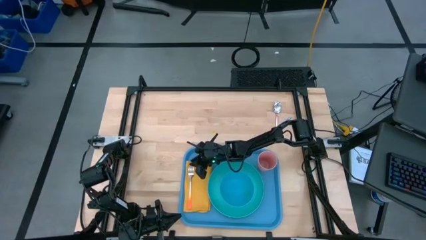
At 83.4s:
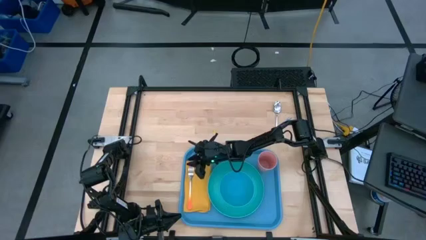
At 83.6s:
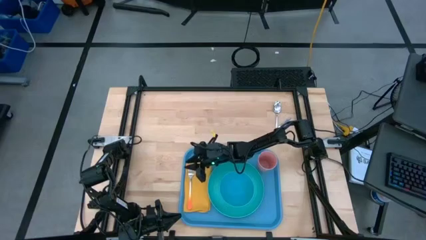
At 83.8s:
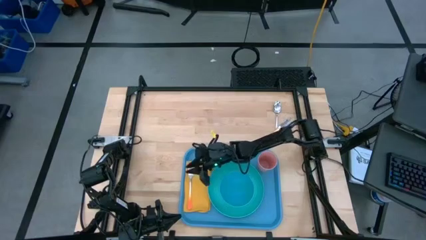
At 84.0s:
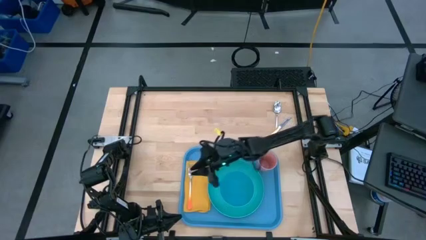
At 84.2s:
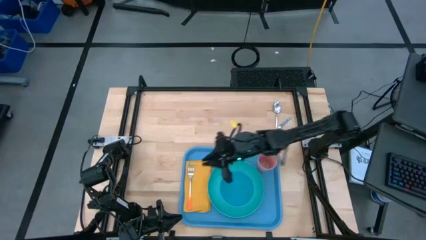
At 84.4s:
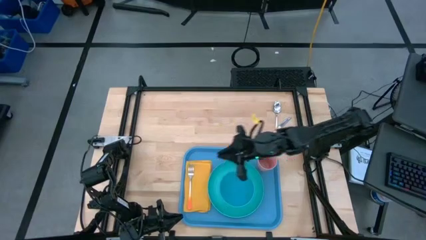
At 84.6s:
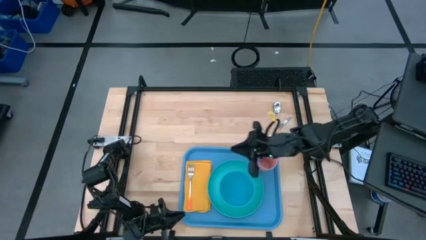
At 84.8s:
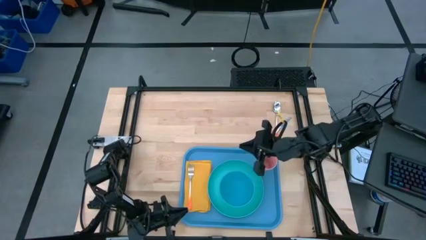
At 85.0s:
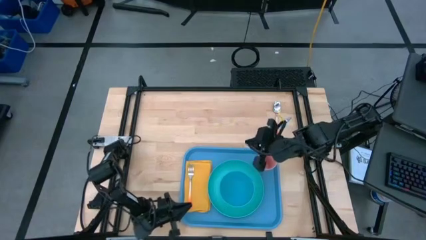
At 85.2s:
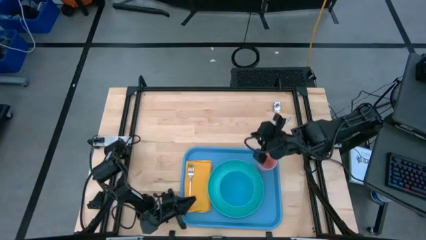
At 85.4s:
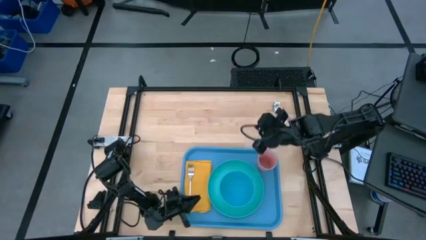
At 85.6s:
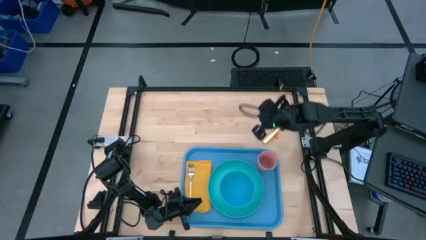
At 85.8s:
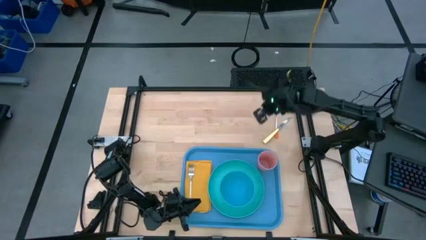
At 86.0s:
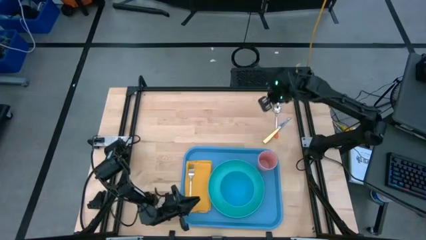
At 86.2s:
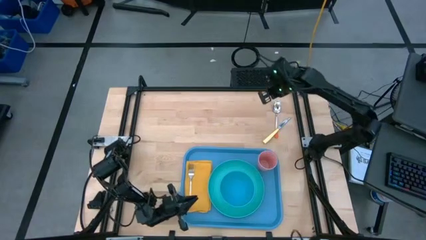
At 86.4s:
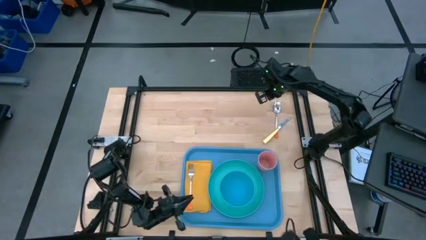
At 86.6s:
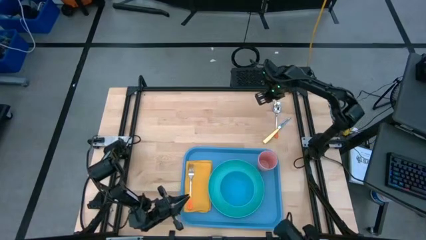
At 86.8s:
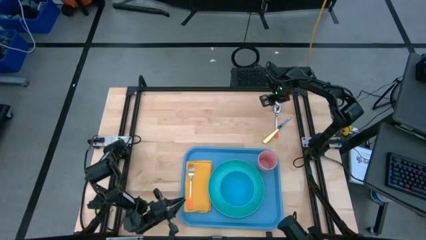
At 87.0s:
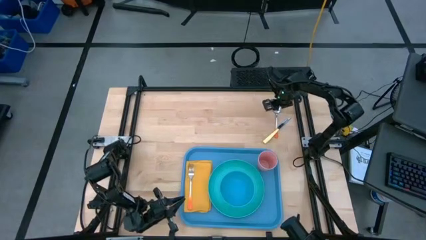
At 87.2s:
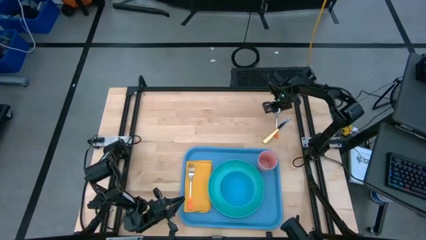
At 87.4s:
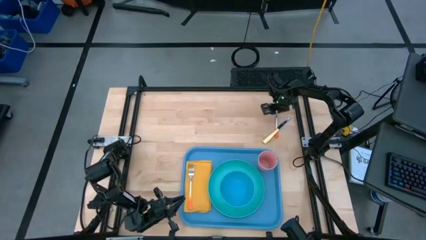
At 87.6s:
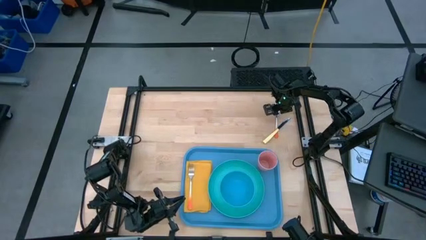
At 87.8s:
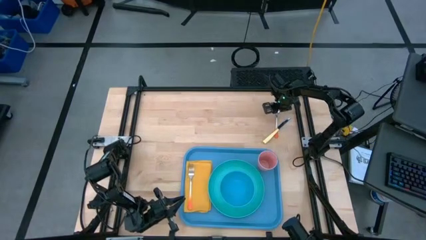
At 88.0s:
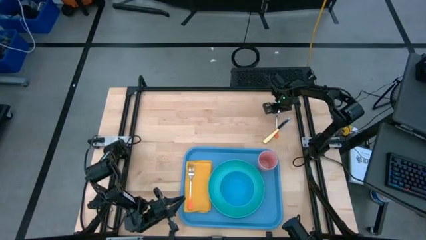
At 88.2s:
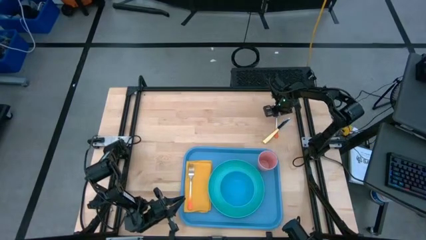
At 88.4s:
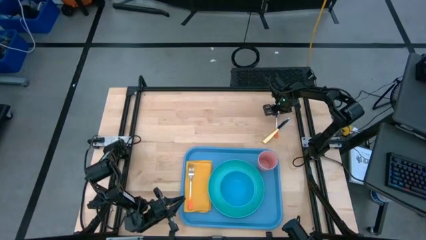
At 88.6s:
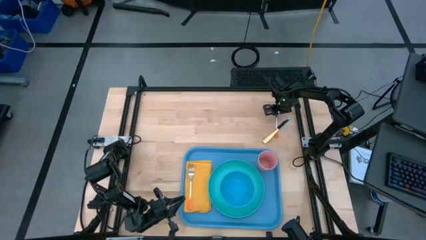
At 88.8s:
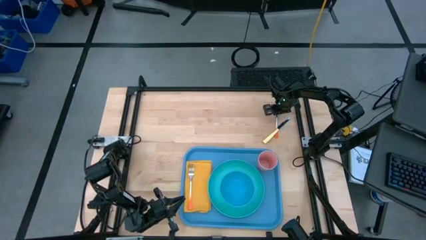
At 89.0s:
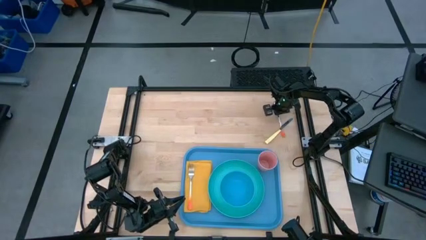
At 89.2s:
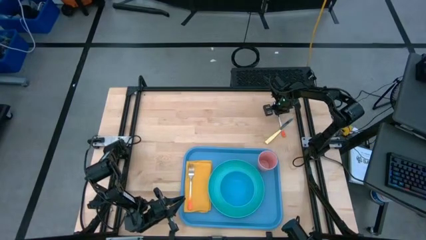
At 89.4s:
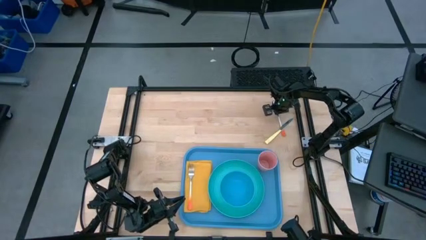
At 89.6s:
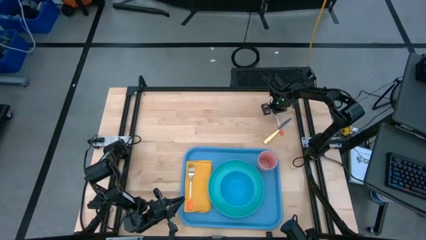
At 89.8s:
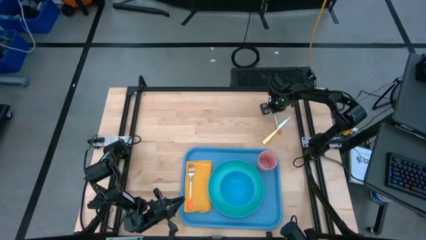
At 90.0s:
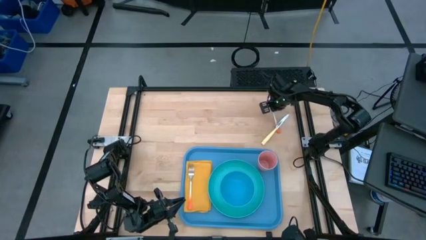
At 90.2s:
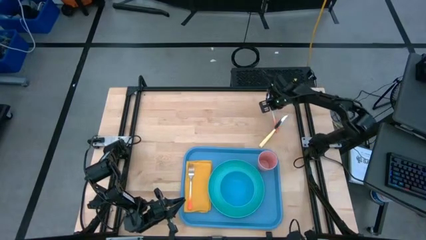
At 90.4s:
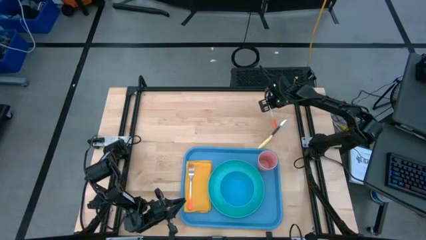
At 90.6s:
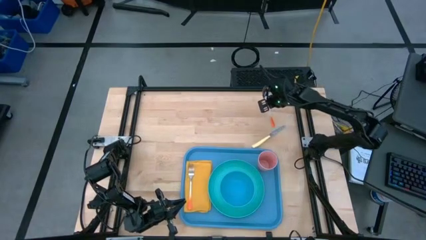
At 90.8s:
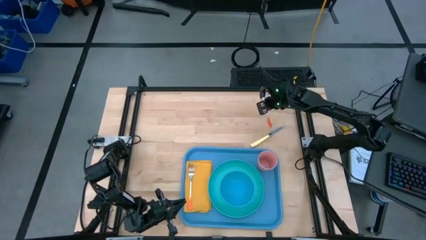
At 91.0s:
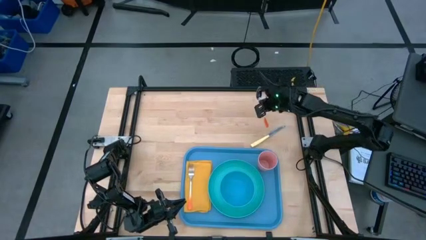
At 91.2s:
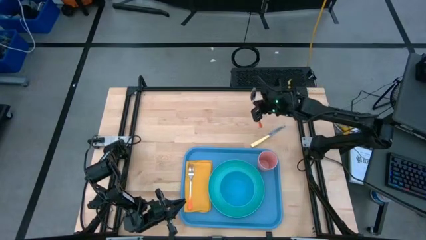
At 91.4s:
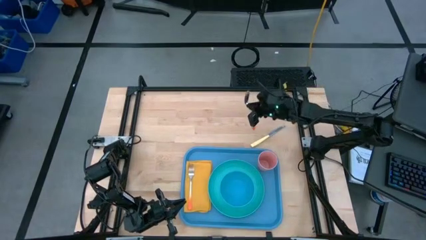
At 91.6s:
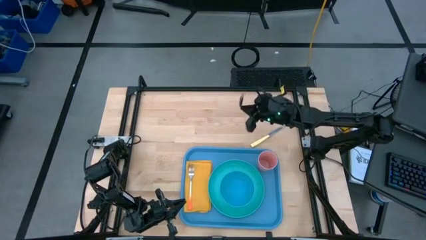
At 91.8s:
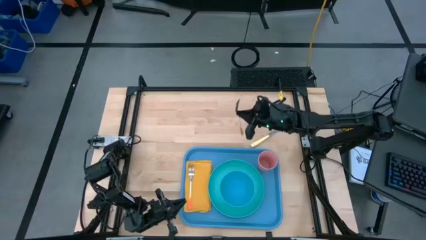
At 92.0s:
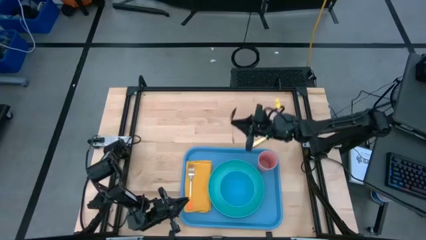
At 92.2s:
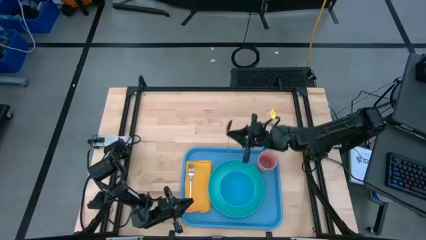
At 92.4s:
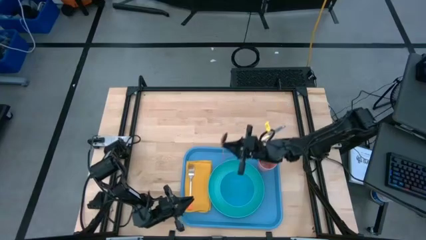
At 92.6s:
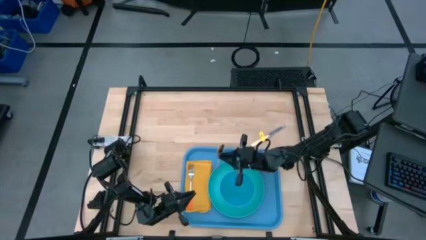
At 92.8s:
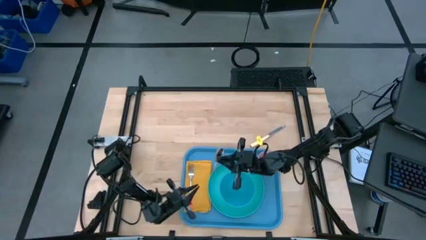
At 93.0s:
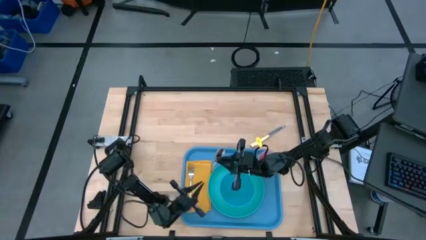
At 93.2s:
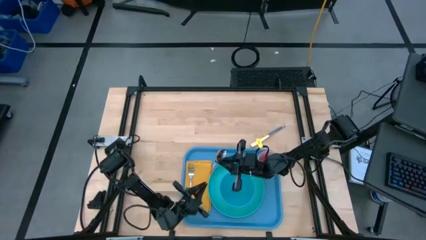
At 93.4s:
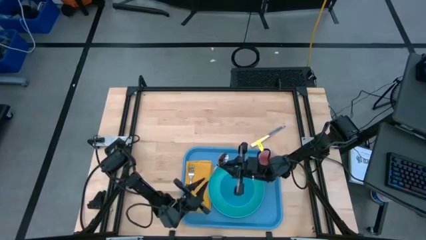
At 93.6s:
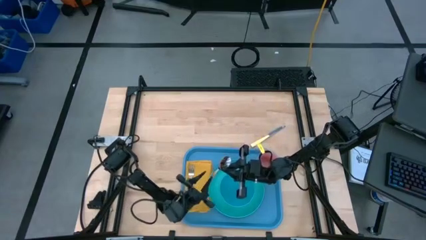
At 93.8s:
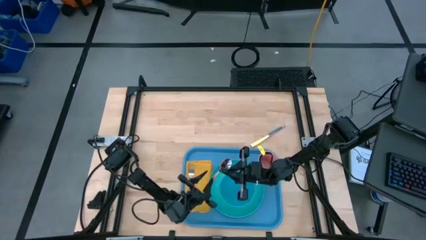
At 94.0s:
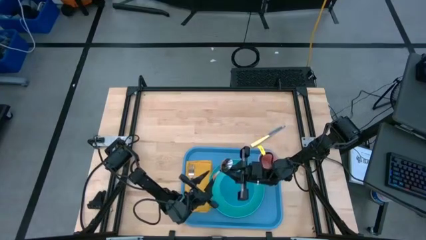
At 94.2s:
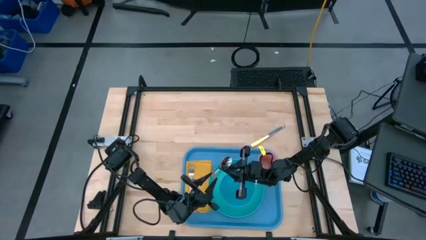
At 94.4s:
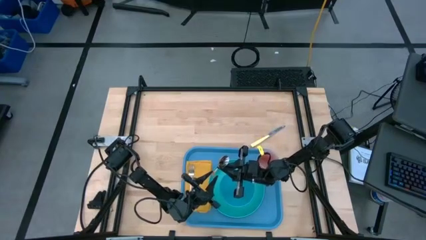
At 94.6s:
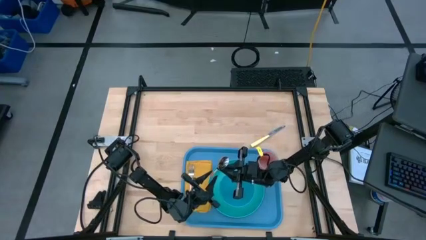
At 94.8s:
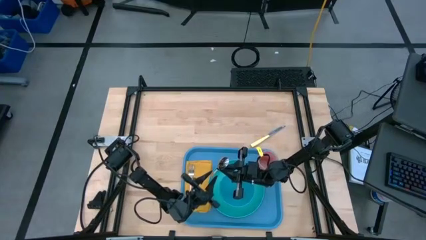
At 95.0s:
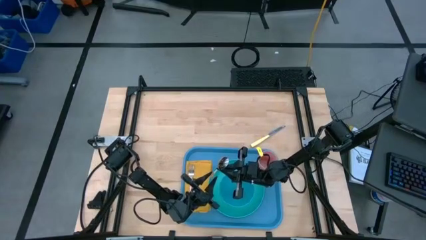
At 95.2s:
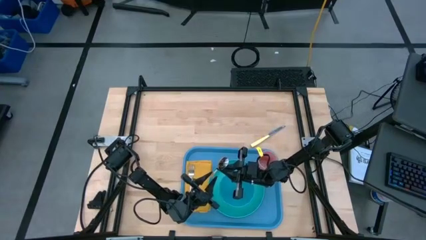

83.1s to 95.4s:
Task: Set up tray
Put the spoon beside the fork on top of the napkin

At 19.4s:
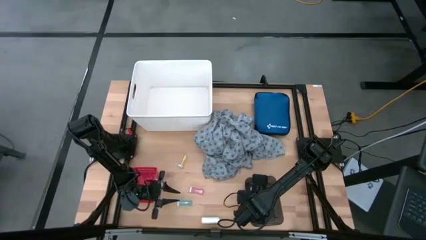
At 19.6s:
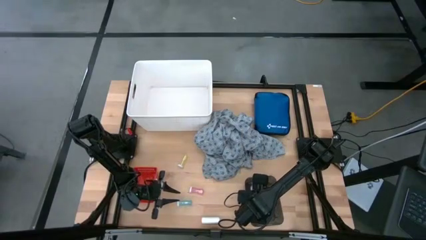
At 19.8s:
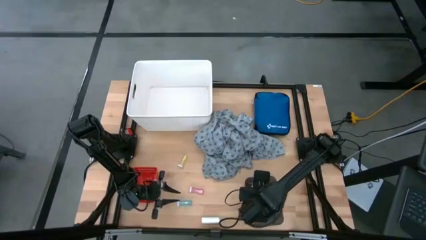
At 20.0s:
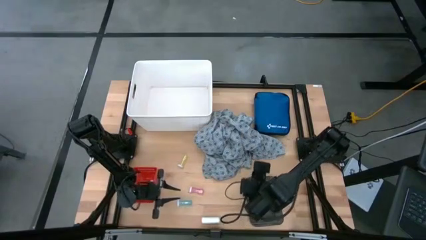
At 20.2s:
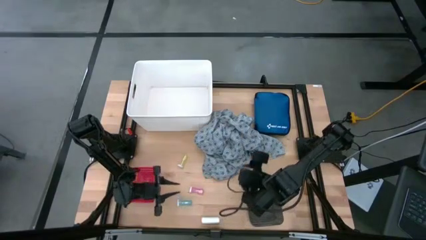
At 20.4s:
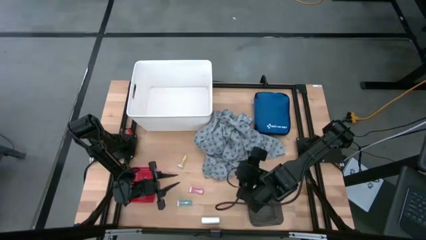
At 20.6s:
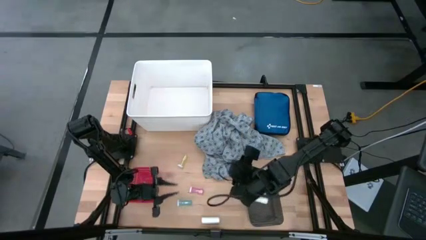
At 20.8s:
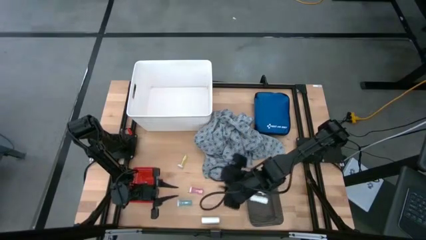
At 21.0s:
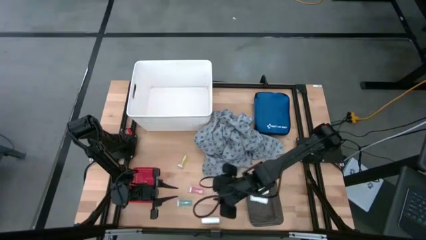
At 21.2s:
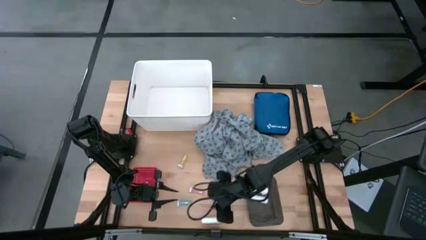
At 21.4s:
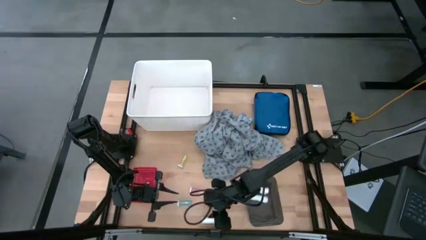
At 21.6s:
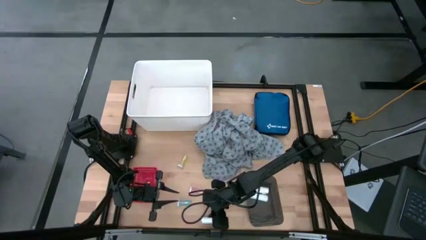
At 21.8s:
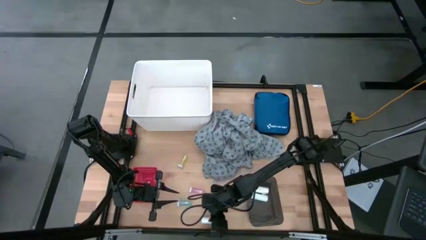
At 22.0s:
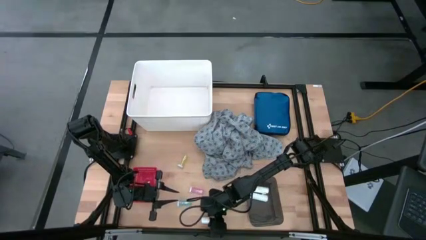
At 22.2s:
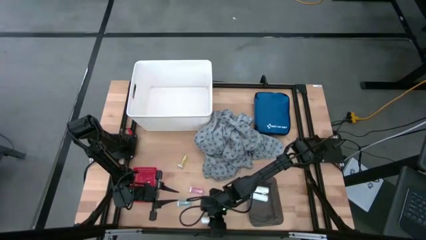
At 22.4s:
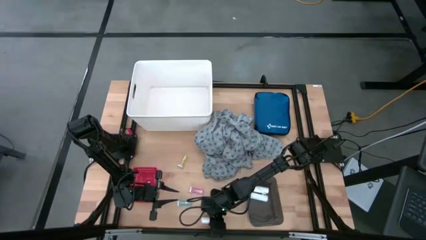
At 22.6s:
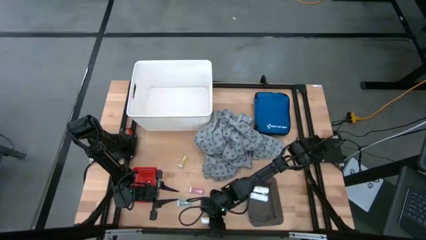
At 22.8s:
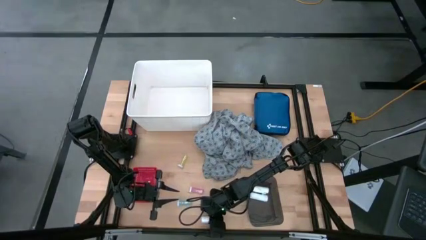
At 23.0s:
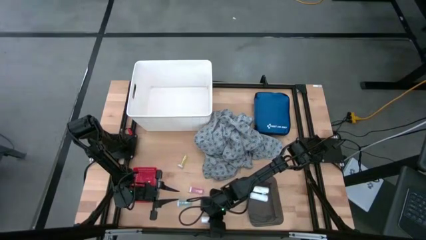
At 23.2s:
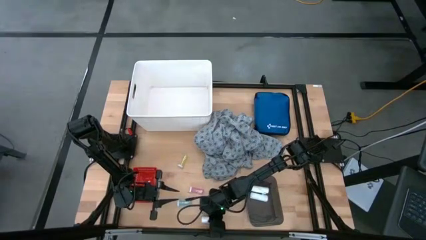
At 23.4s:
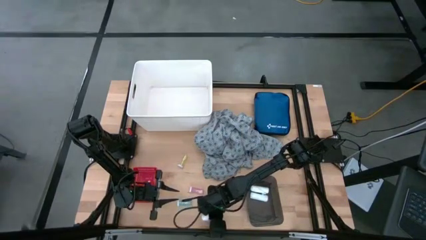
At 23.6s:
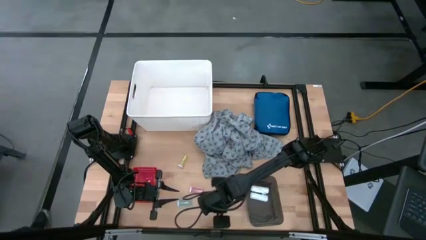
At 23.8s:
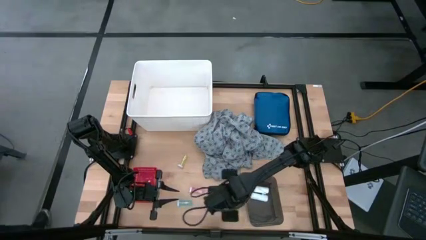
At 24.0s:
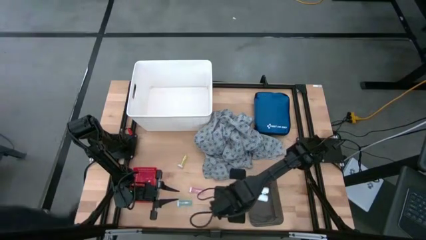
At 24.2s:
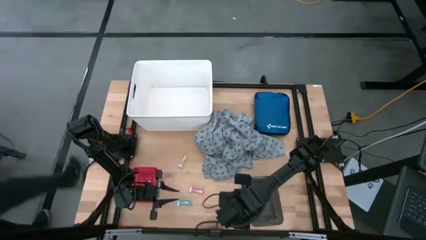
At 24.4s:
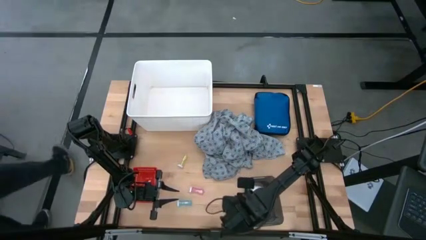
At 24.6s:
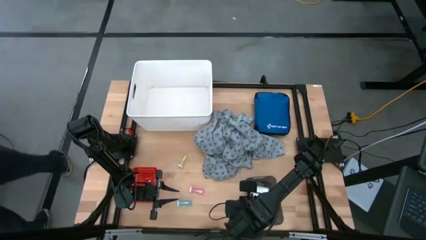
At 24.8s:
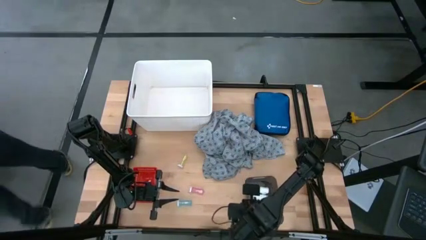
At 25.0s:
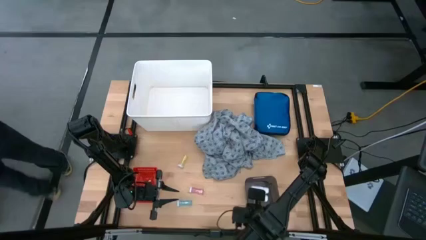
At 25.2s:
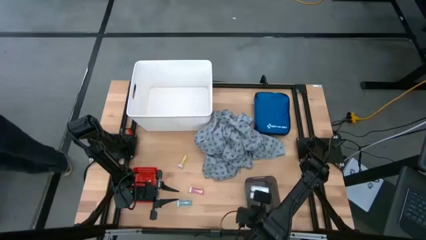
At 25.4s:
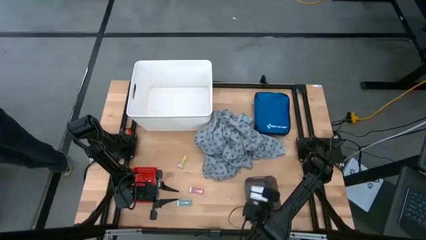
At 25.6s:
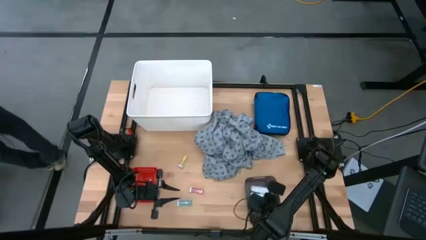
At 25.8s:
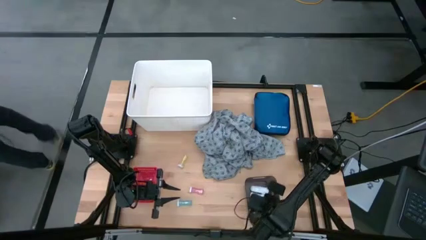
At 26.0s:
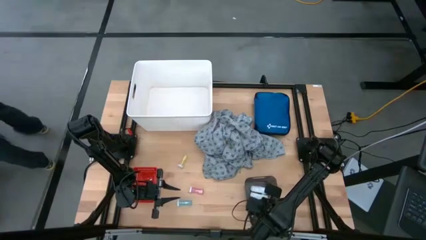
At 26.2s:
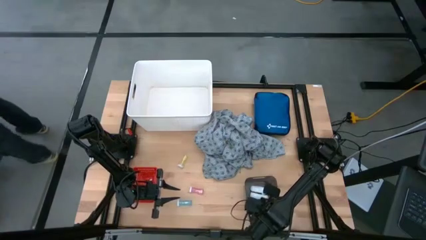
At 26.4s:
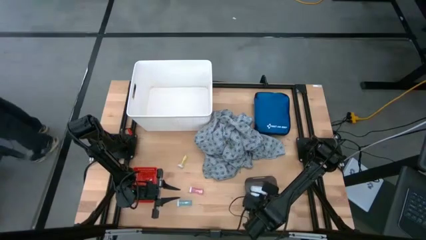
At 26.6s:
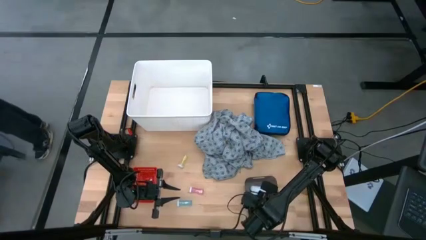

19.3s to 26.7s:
Task: Pick & Place Medicine items
Put the white rolled gauze into the black bin
